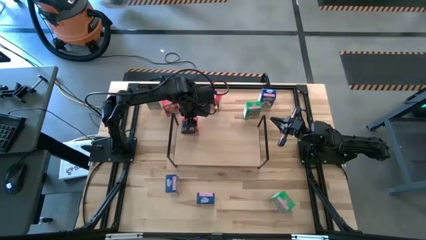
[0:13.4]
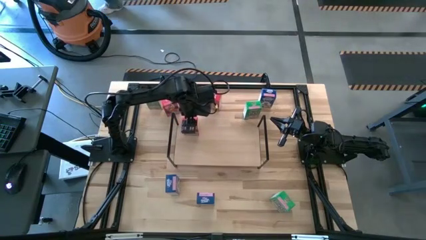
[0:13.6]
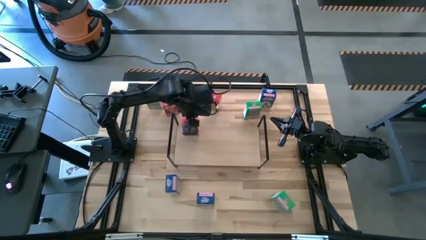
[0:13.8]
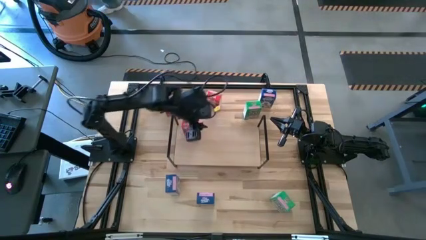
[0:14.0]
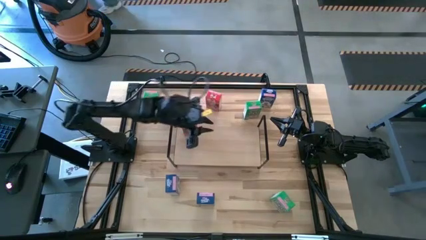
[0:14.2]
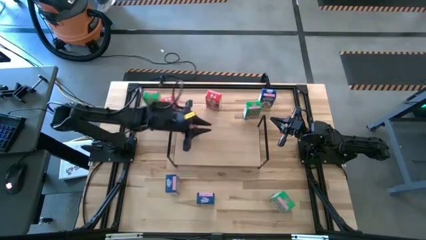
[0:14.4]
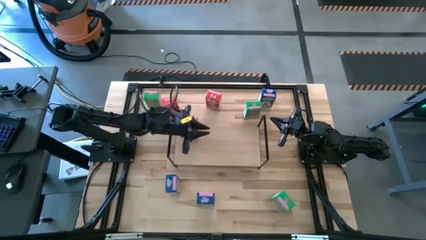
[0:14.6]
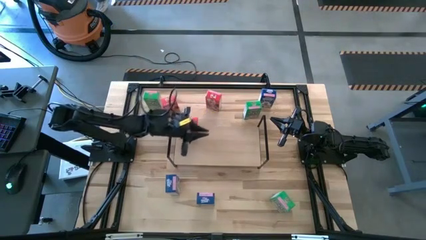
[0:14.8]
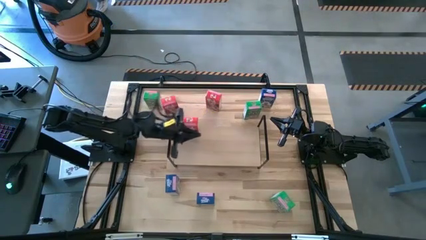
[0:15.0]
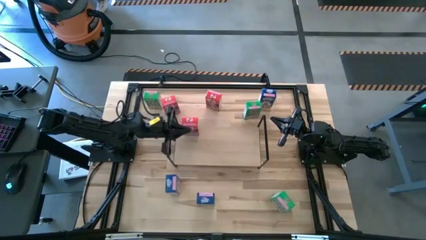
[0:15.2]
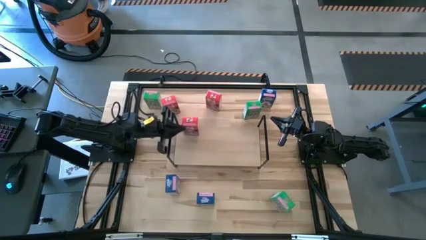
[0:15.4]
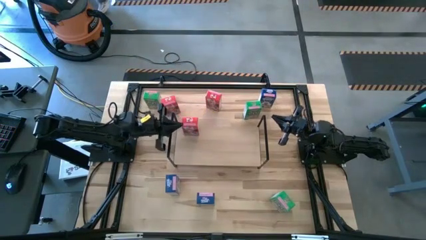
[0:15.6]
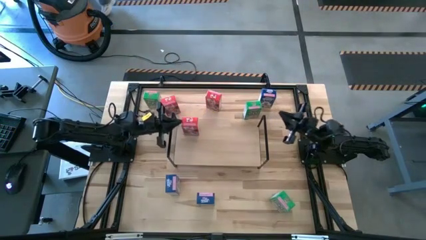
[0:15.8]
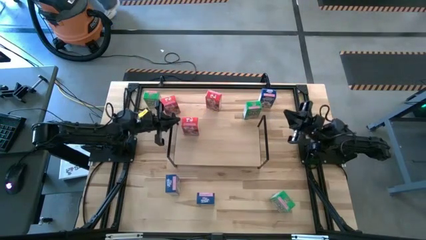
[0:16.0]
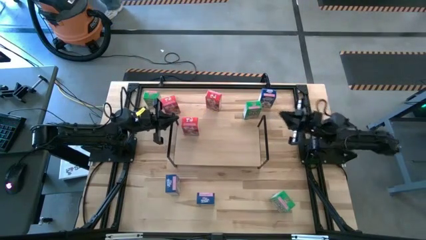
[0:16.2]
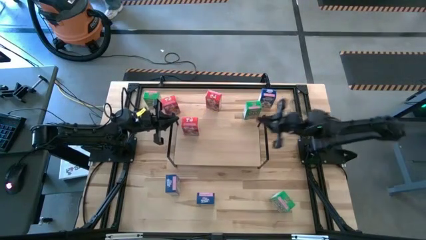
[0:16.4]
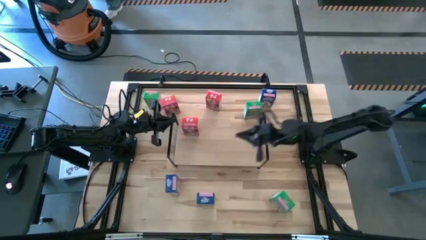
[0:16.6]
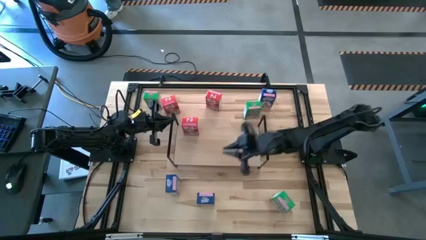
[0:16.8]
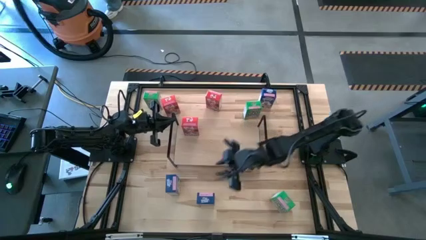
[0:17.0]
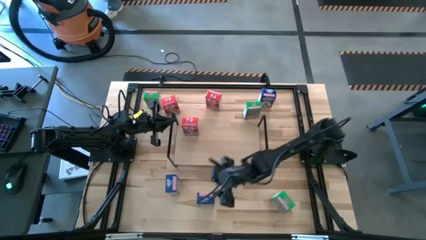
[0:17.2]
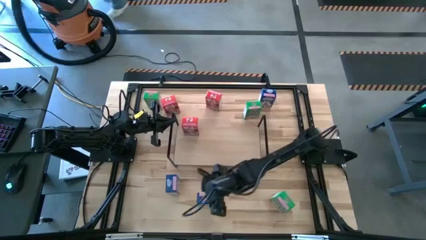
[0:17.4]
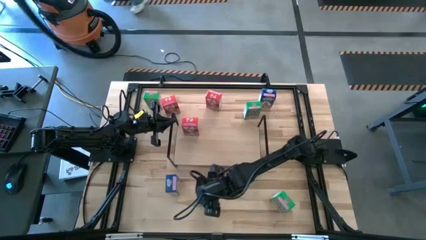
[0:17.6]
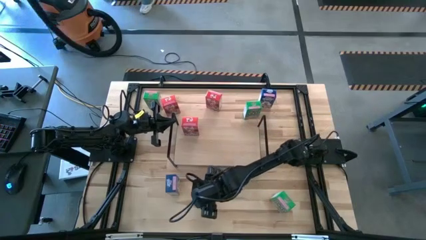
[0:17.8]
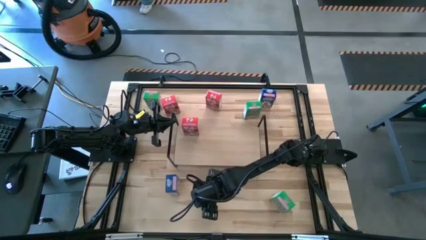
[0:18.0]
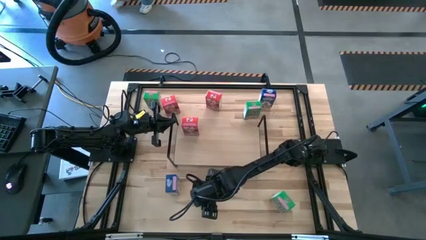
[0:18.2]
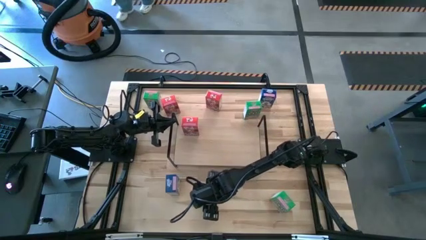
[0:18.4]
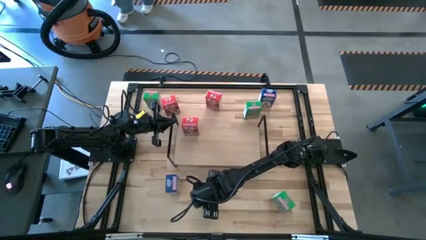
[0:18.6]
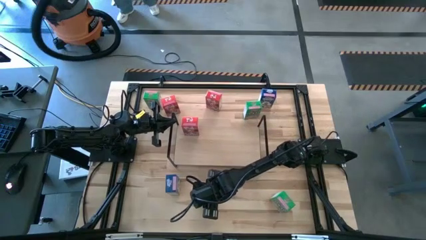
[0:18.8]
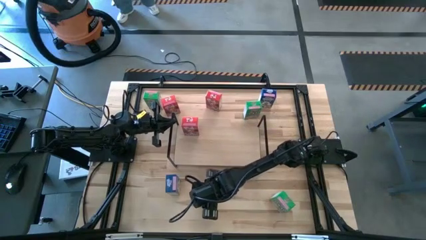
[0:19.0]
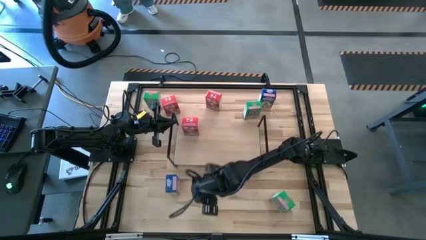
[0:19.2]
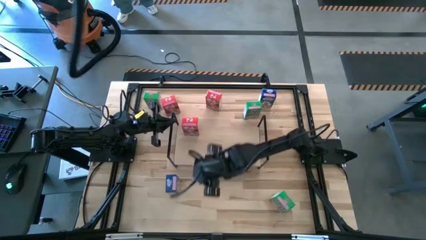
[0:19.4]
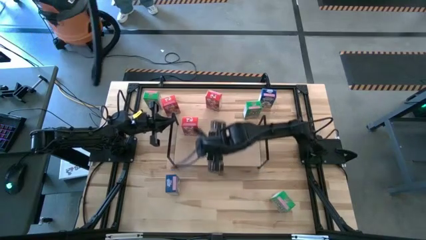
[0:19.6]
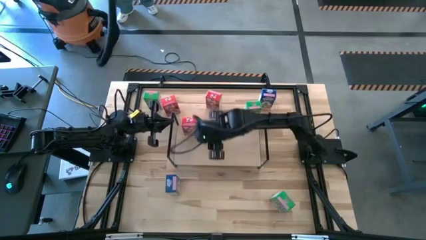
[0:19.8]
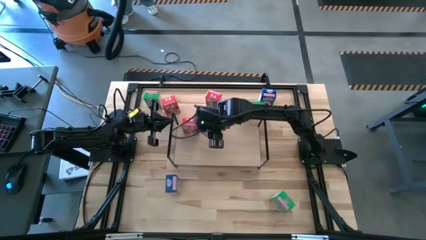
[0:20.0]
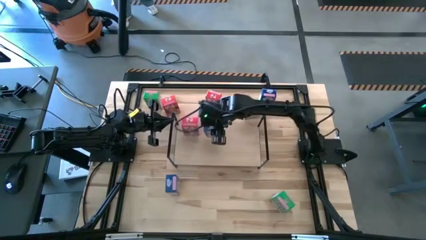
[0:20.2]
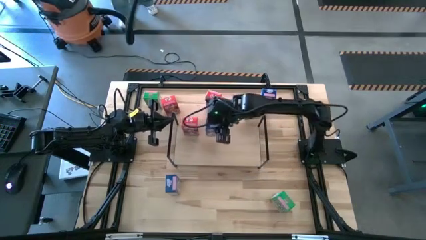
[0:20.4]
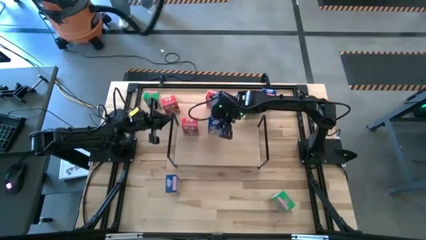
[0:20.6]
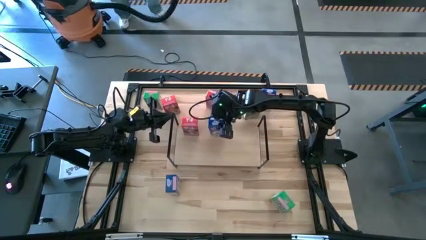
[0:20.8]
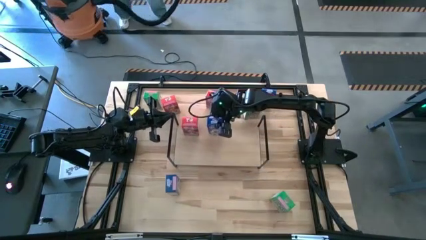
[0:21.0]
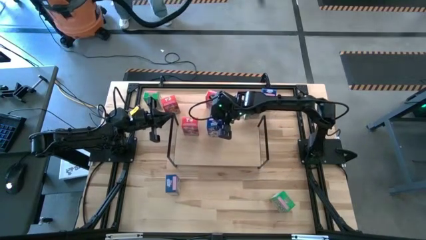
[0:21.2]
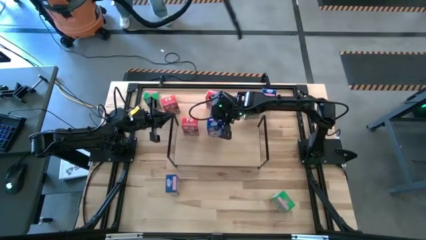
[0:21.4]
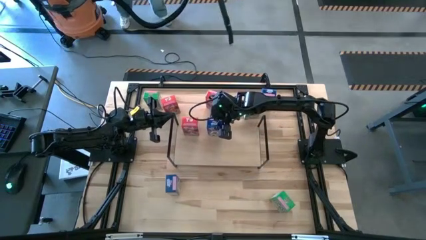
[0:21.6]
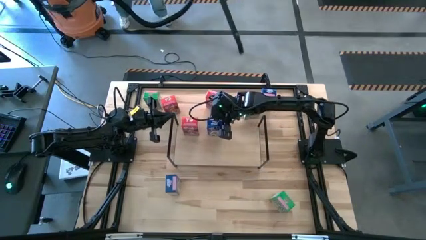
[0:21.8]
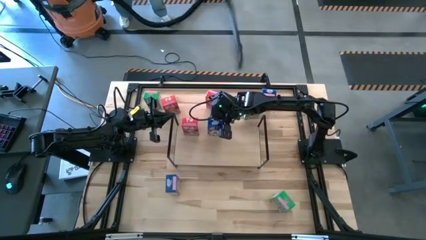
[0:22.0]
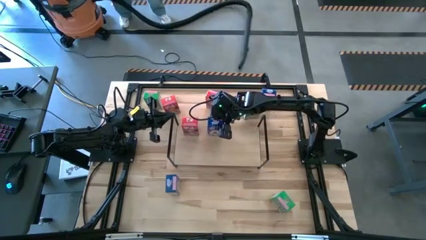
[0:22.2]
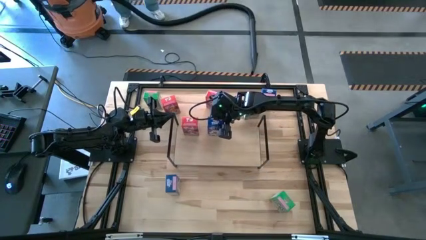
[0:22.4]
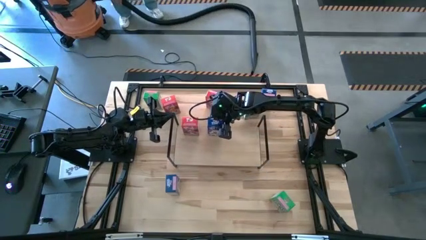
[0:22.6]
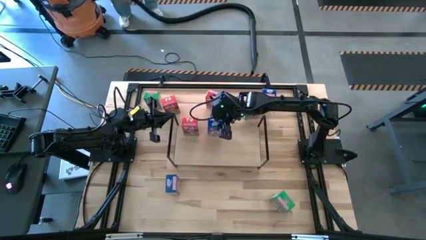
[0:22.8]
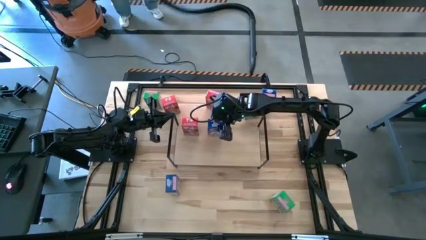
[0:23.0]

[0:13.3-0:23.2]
Task: Stack cereal on shelf
Put the bottom blue cereal box on the shelf

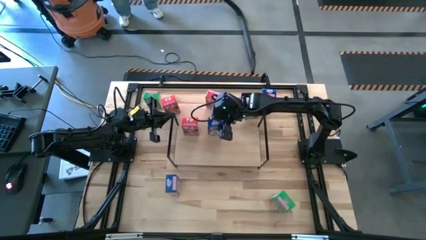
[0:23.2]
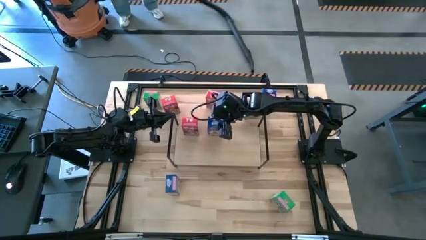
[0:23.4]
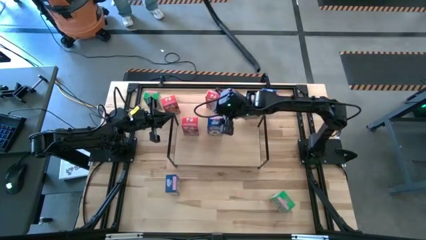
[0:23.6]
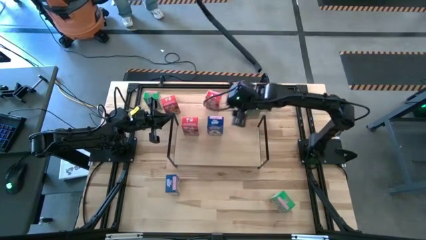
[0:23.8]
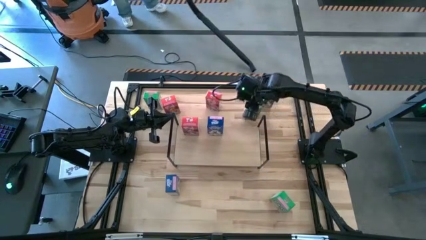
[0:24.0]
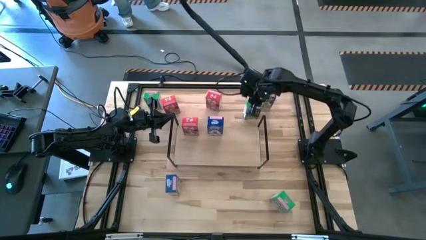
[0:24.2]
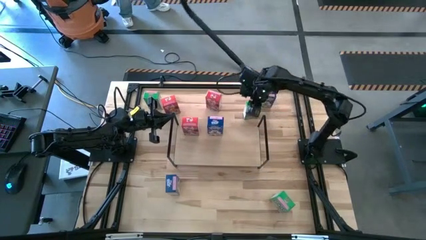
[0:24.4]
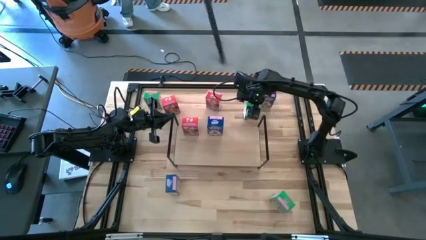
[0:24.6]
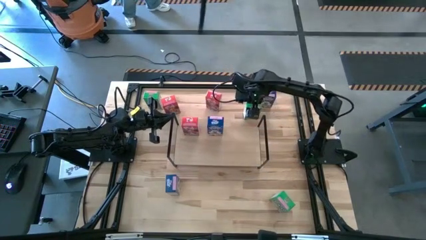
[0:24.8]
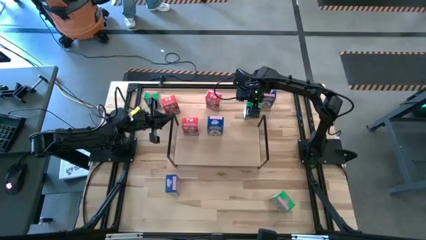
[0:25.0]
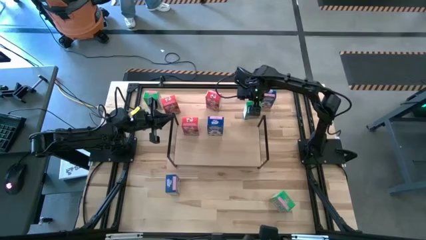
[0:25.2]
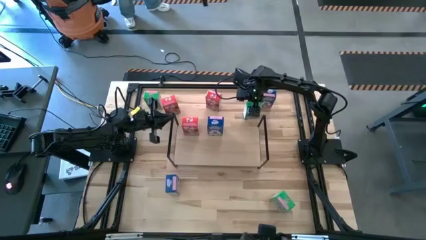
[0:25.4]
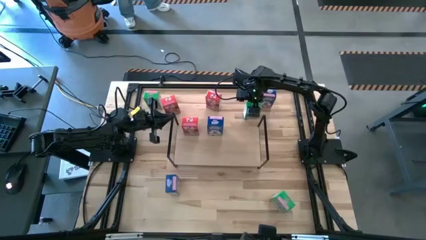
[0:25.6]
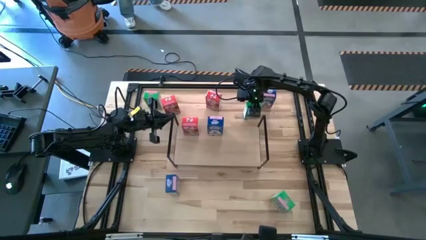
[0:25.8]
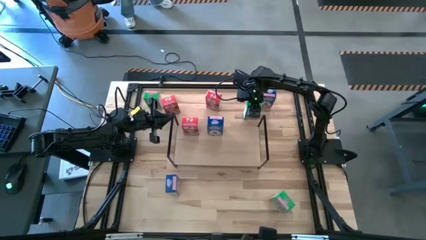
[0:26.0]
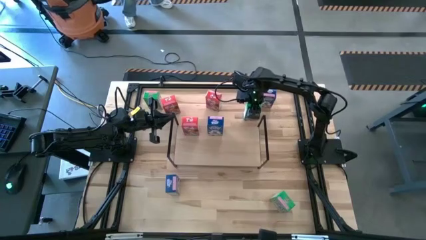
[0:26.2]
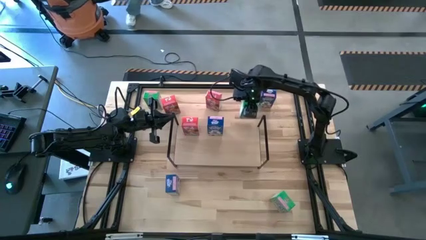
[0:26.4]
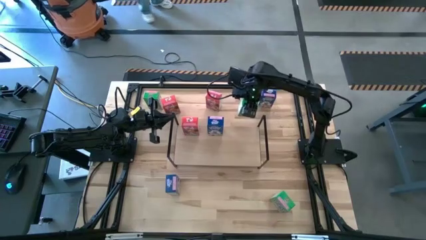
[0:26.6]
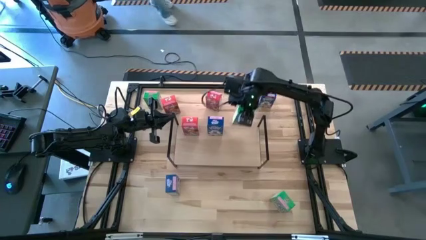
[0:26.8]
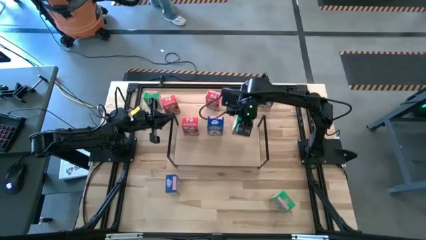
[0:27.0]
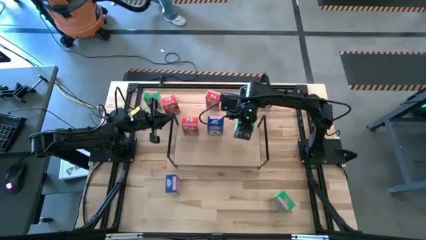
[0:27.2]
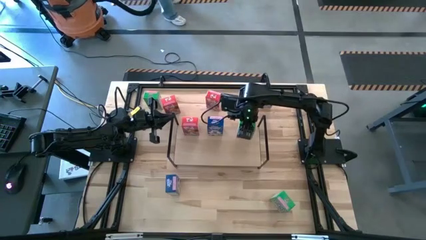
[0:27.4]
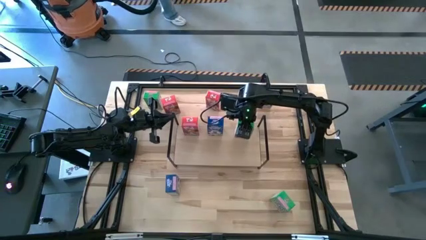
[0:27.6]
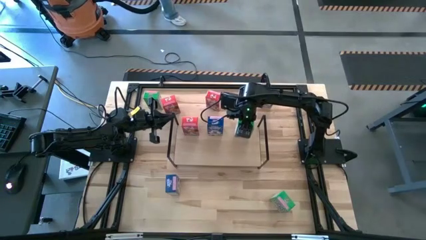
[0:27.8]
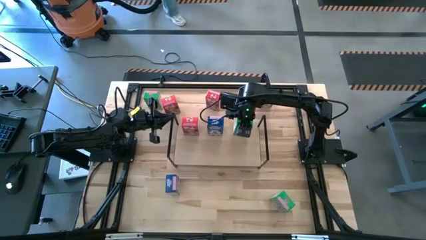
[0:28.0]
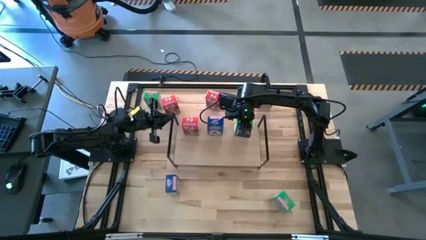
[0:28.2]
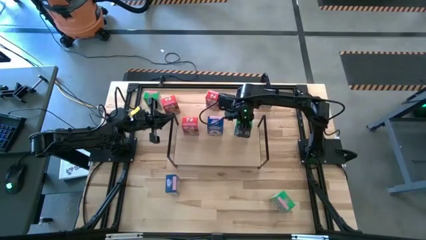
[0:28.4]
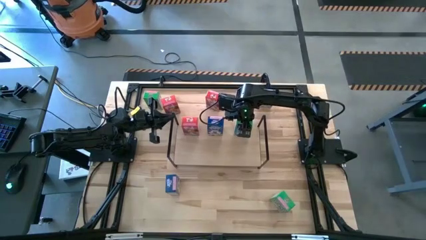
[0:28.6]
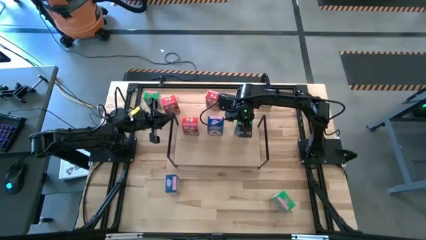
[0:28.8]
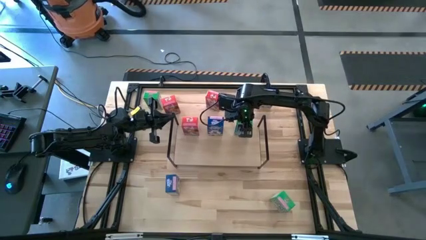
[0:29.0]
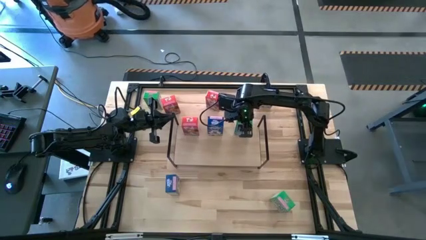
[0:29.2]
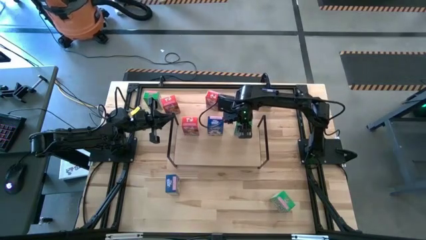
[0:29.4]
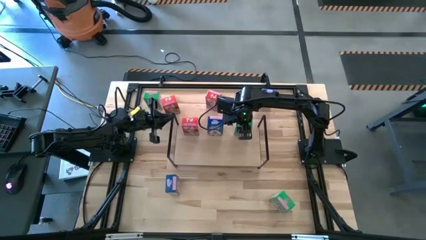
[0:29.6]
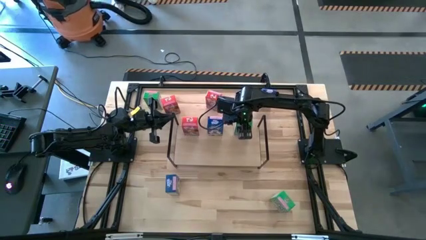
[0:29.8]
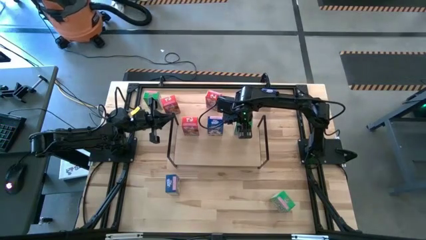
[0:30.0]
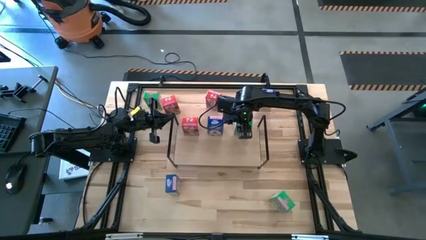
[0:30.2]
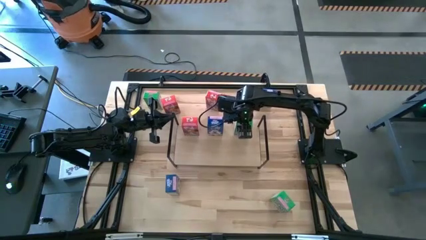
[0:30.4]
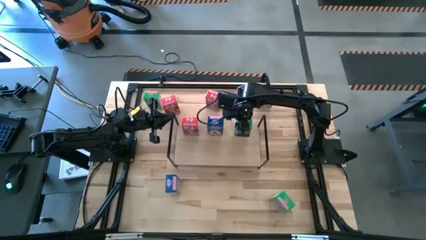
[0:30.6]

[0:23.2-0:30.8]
Put the top right green cereal box on the shelf
